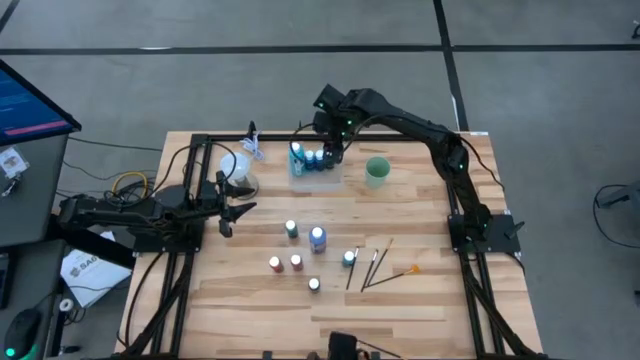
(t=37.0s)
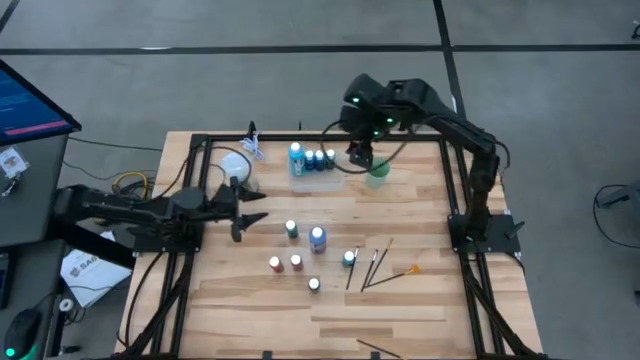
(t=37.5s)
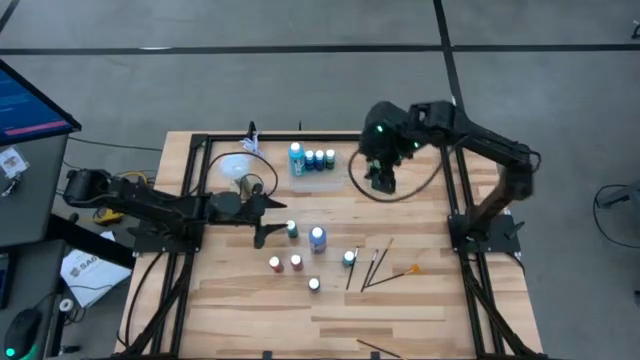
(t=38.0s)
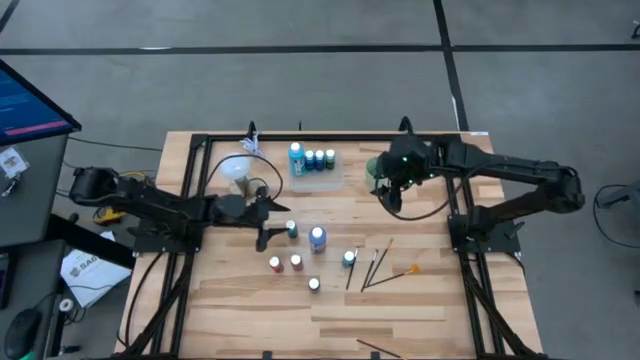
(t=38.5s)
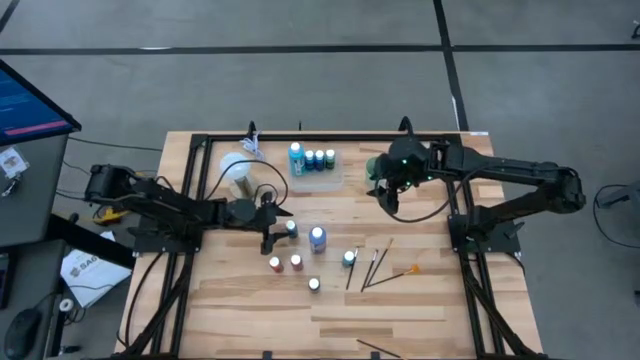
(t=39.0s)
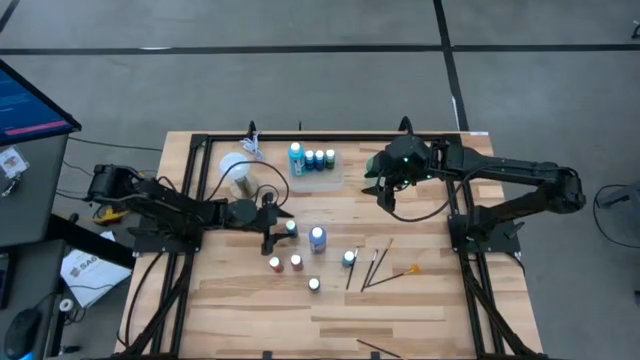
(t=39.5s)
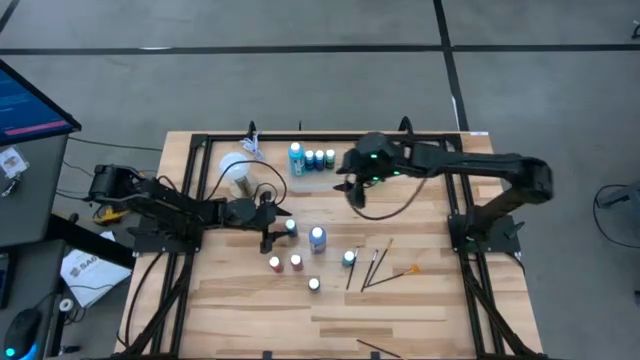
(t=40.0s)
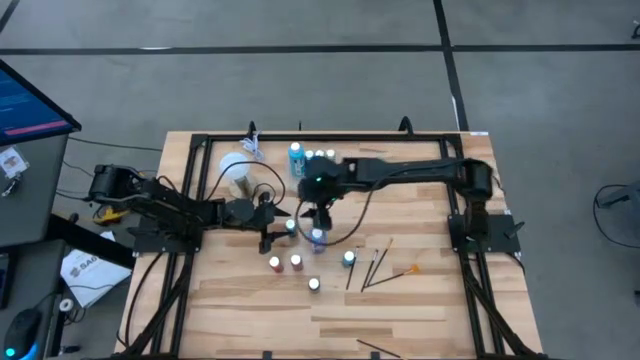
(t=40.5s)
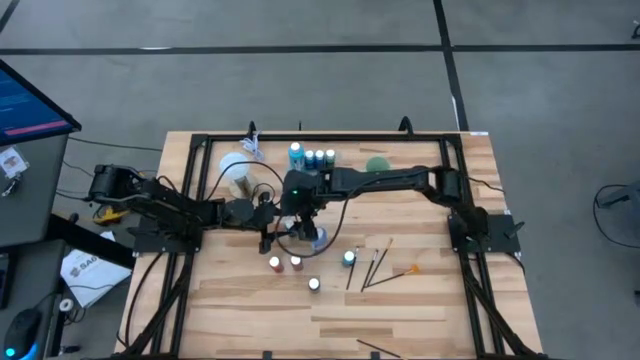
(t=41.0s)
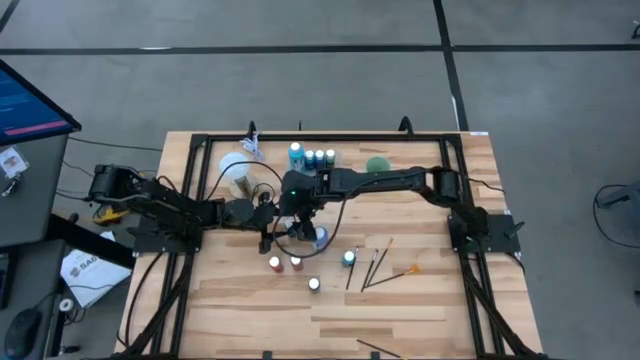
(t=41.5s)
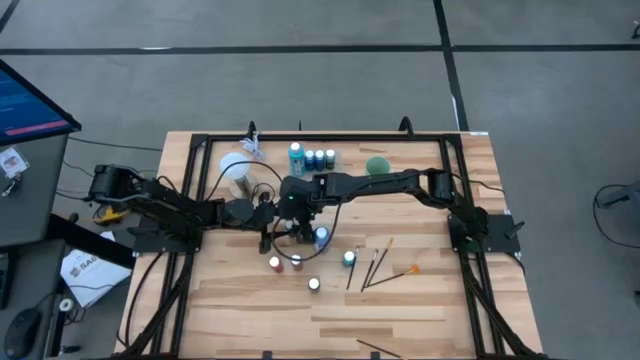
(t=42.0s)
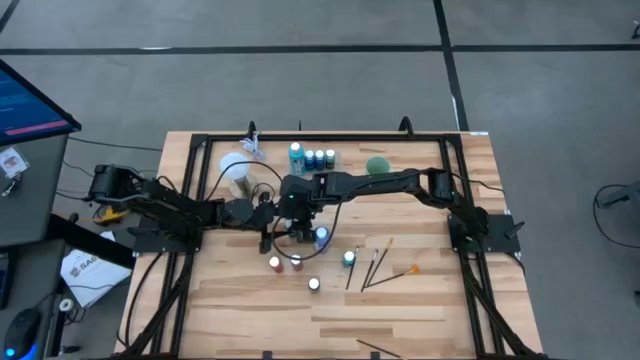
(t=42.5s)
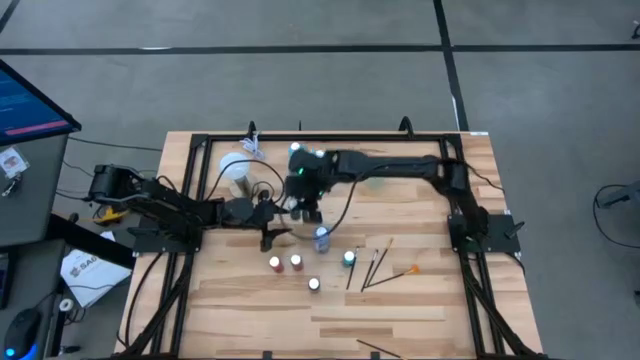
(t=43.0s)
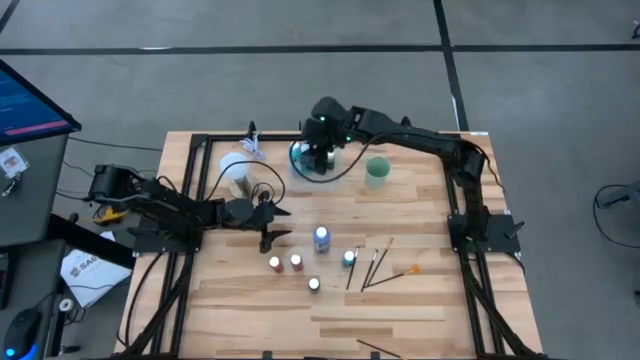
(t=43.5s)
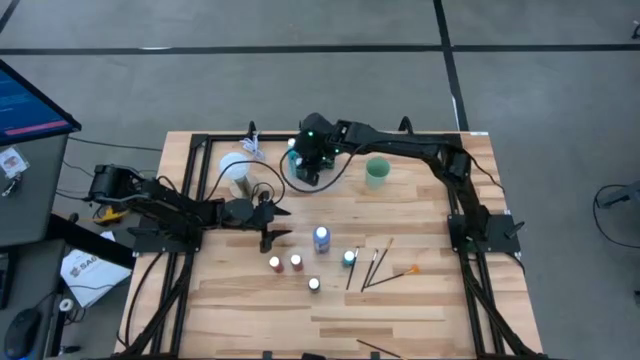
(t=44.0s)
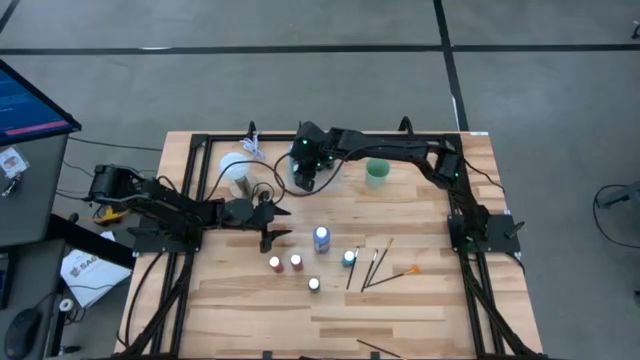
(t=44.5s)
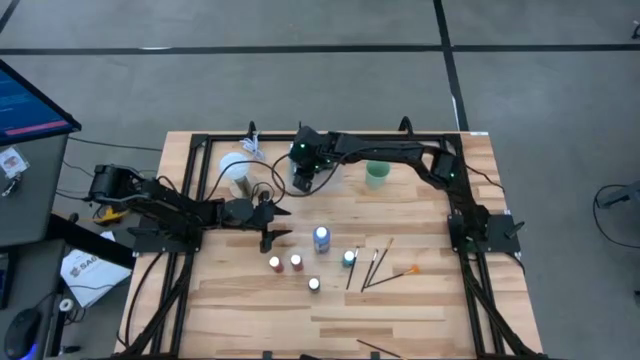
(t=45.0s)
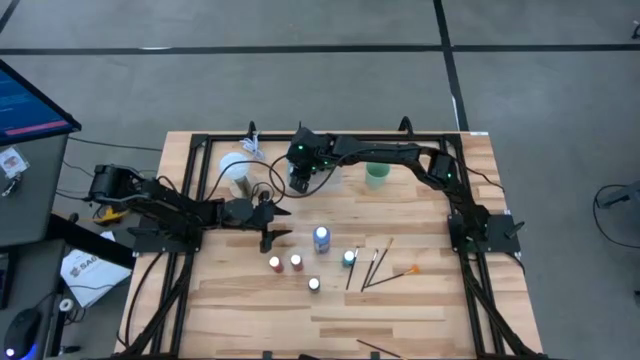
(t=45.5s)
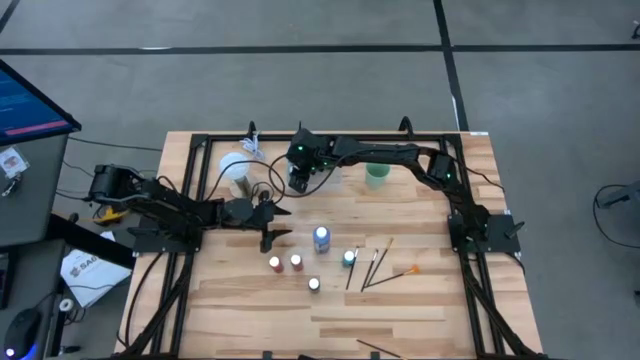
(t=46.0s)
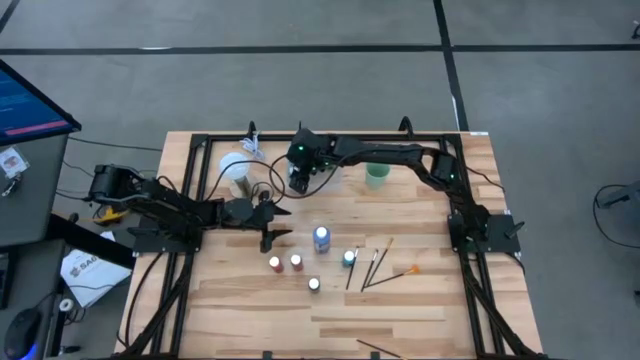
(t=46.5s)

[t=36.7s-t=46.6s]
Task: Pick & Place Paint Supplies
Put the small light green paint bottle into the bin

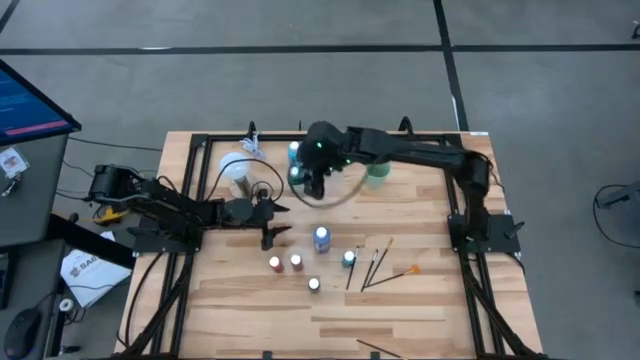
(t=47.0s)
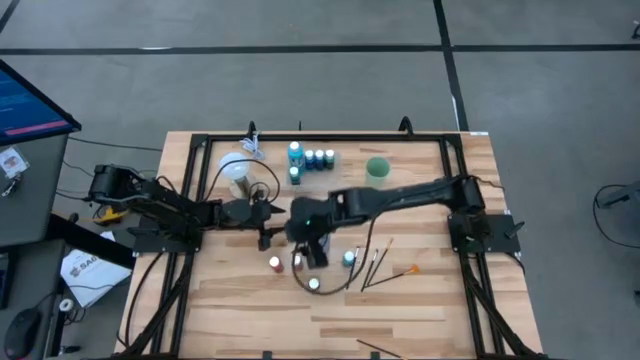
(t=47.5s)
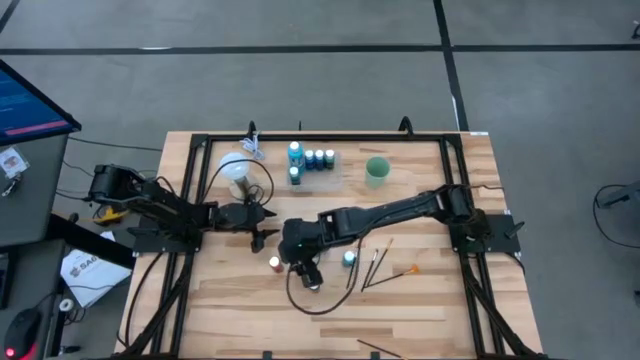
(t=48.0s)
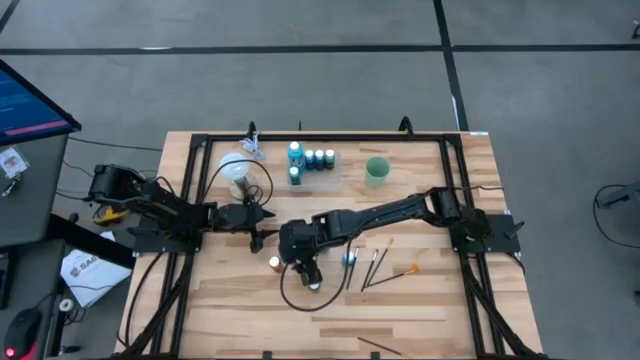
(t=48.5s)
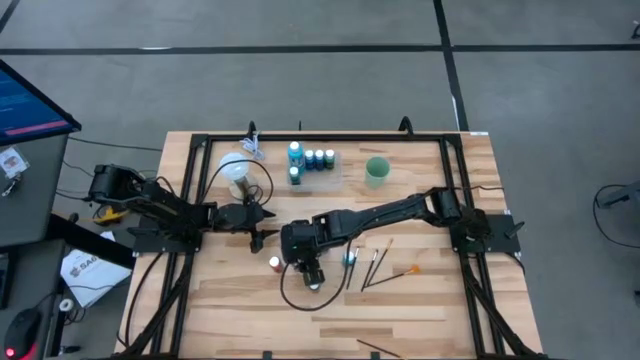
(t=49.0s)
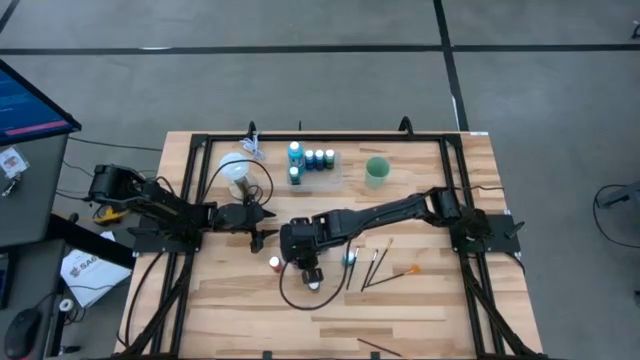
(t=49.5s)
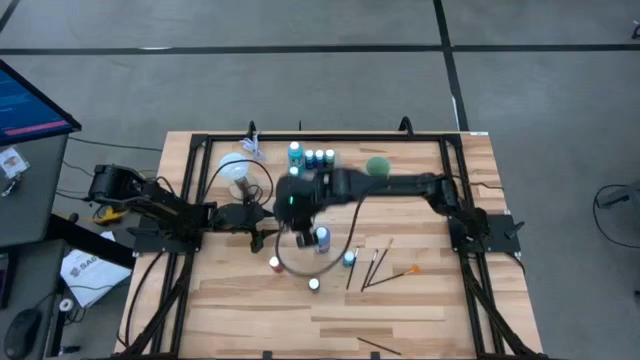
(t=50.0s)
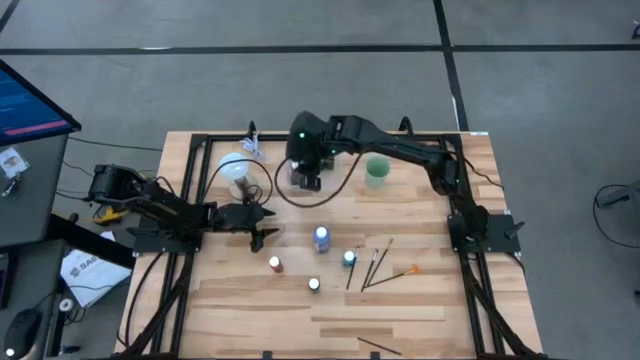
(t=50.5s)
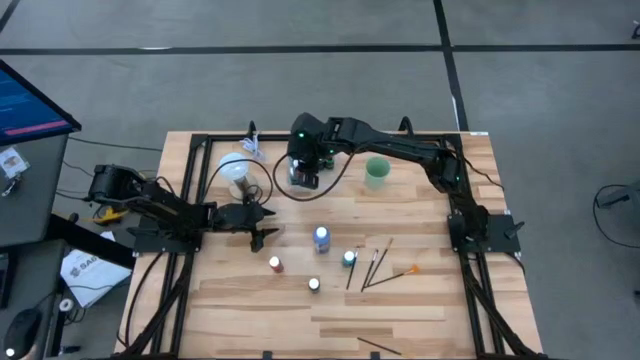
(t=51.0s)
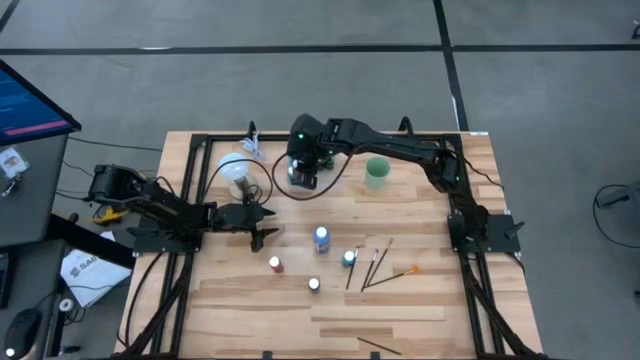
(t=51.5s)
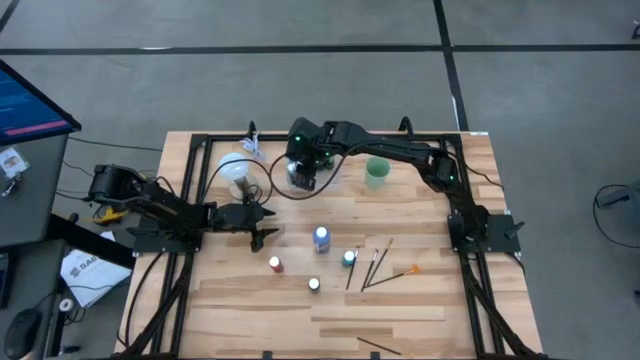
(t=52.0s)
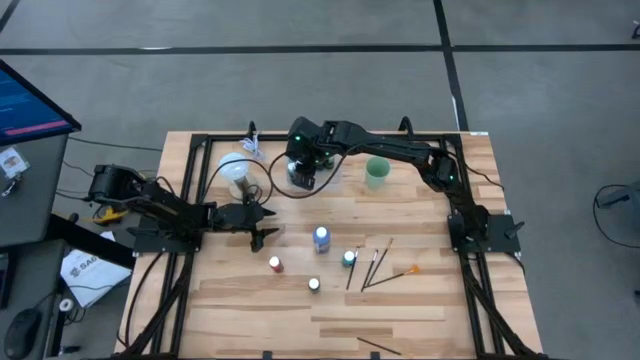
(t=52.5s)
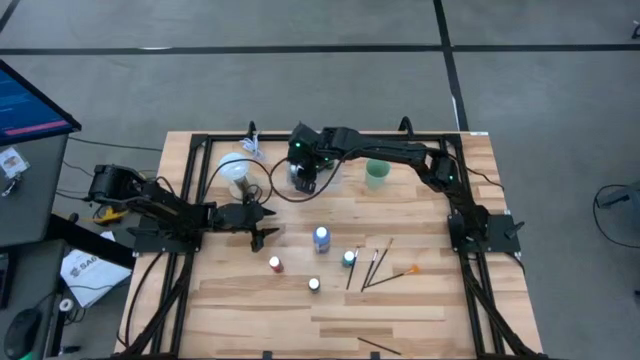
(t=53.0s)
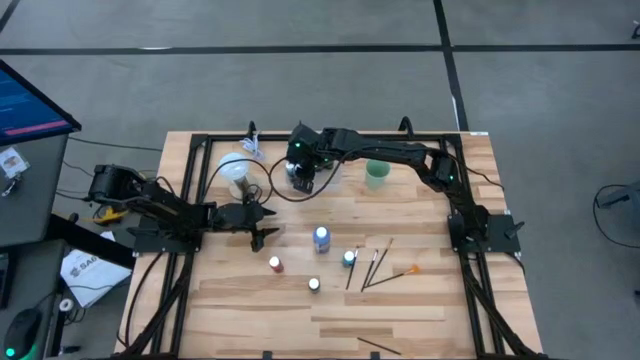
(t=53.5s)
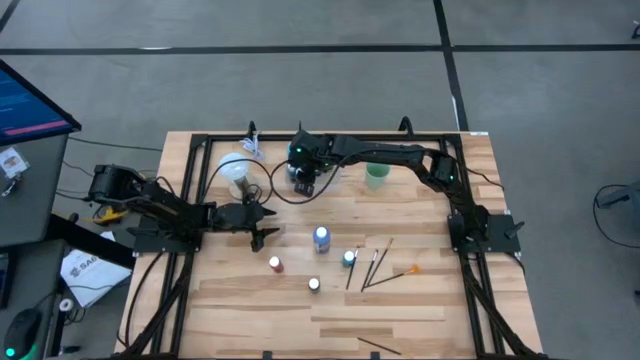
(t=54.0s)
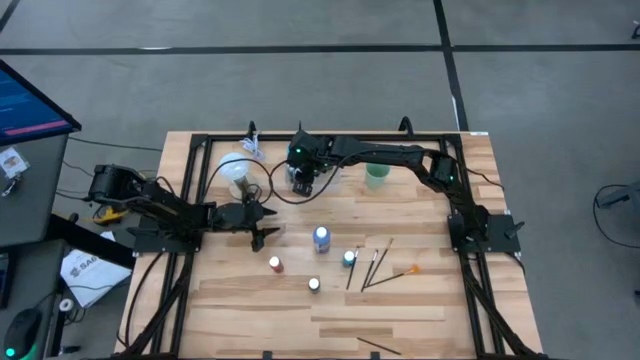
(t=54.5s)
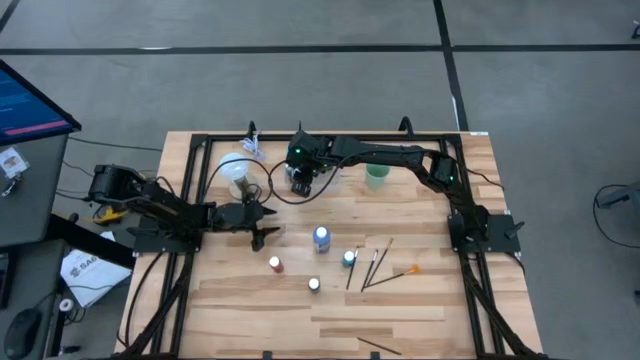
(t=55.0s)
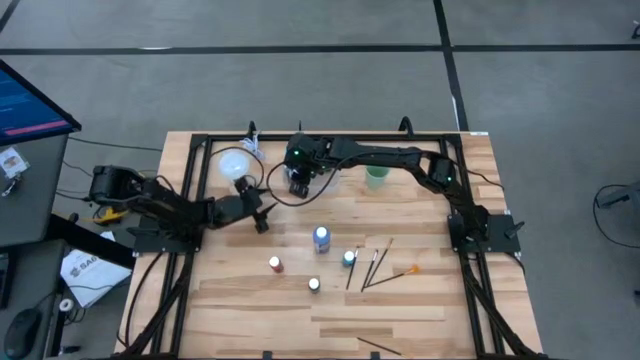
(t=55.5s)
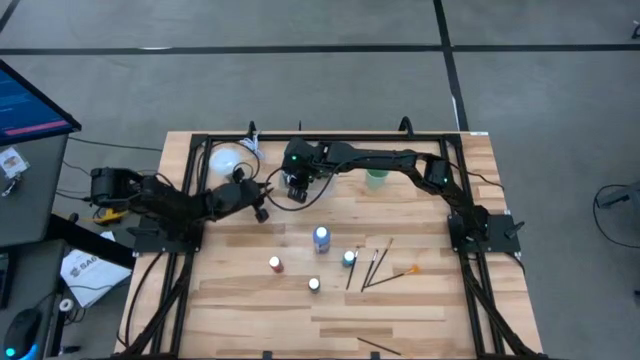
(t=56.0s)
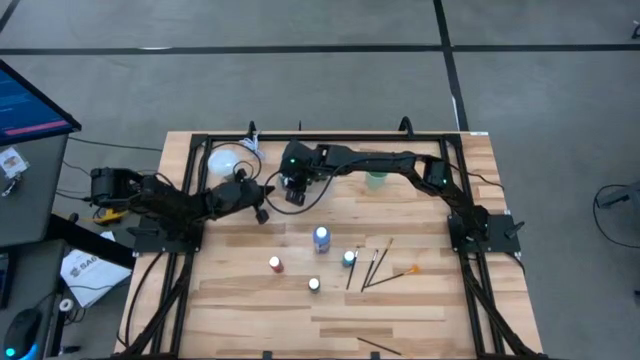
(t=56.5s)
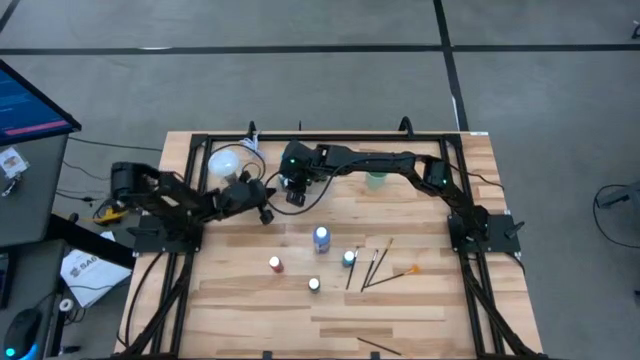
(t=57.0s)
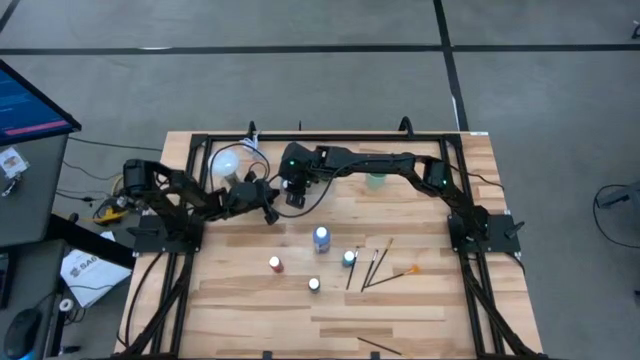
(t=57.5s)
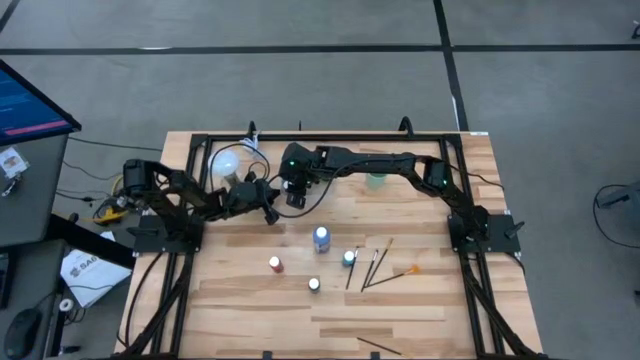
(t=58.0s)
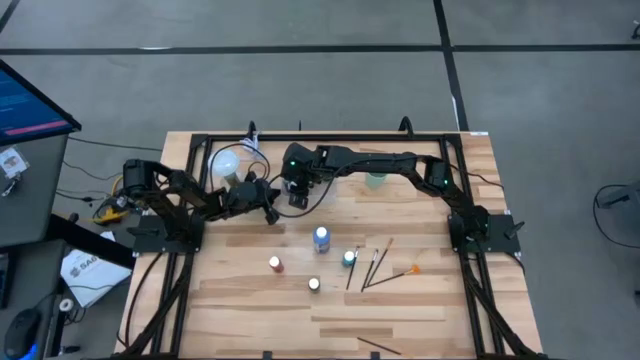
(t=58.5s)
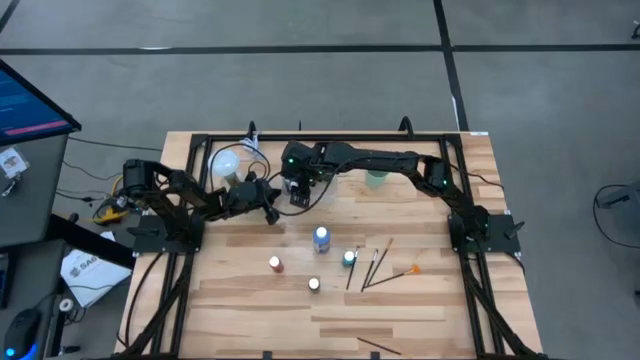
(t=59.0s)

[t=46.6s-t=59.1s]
Put the right small red paint bottle into the bin
